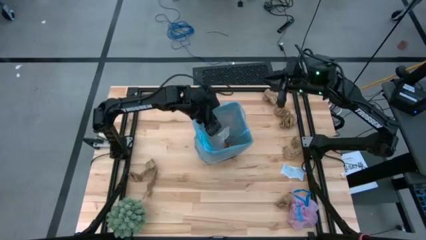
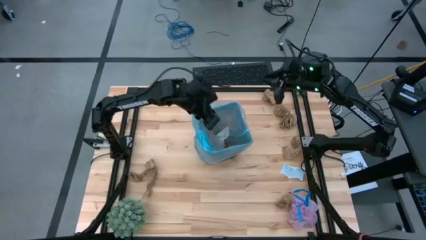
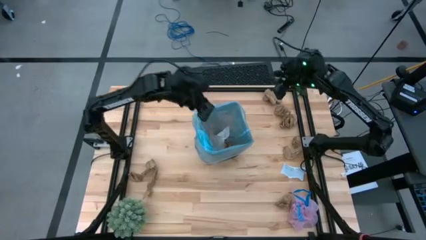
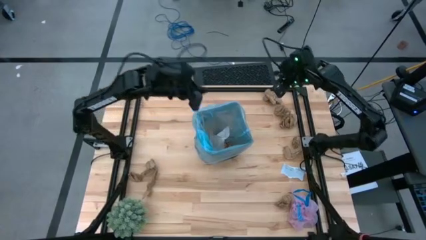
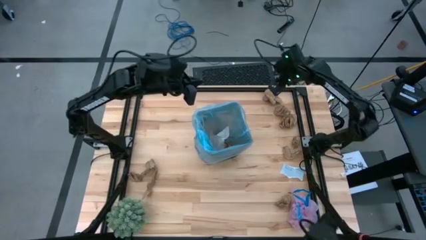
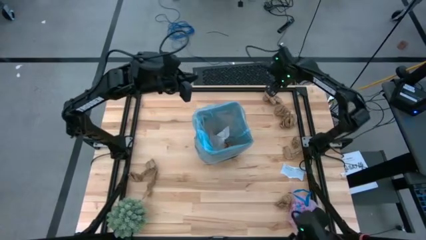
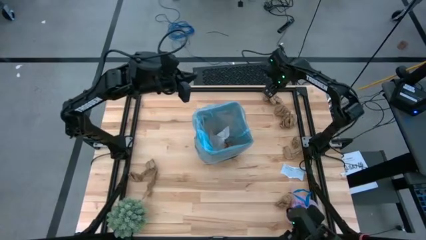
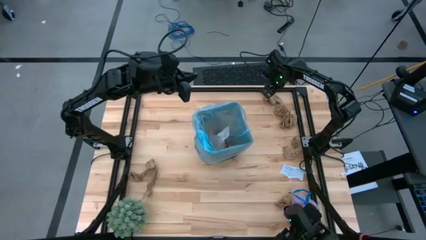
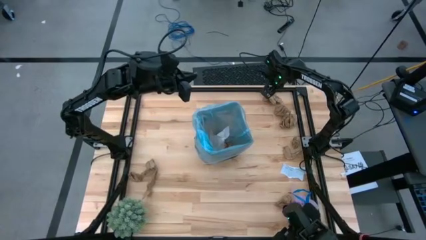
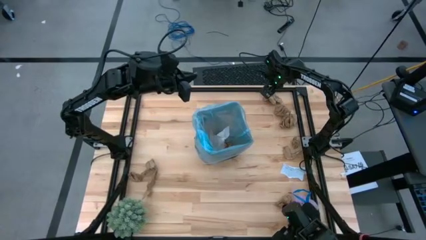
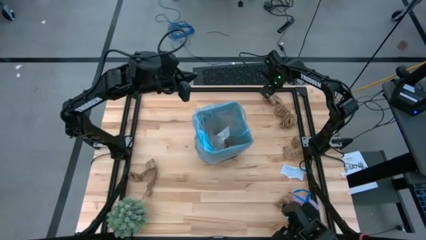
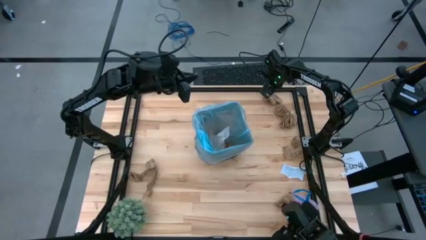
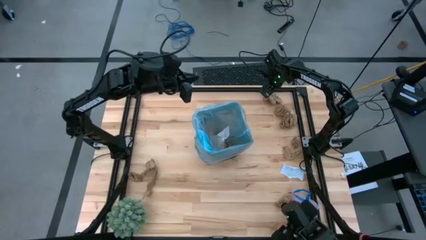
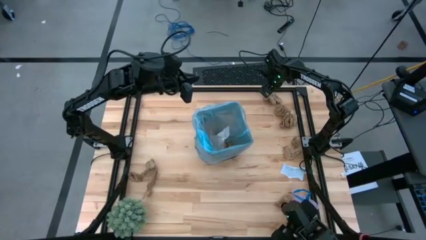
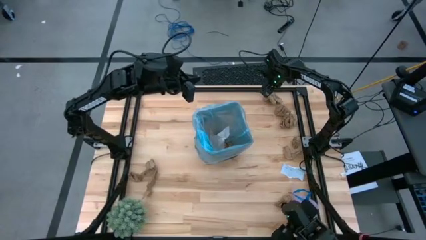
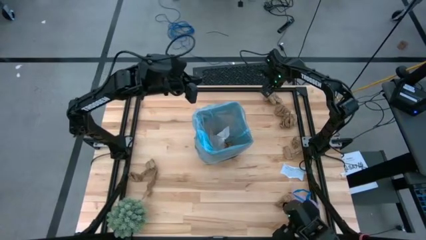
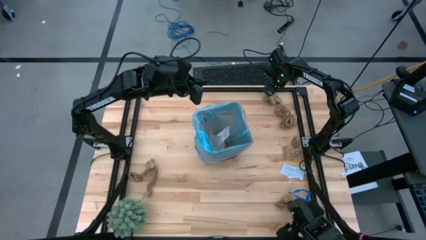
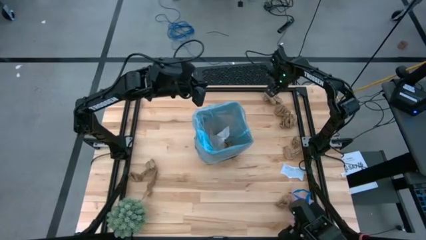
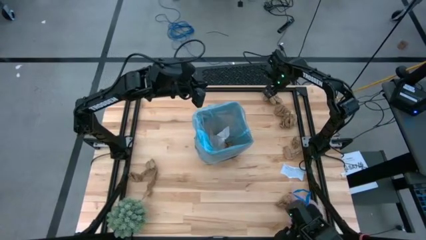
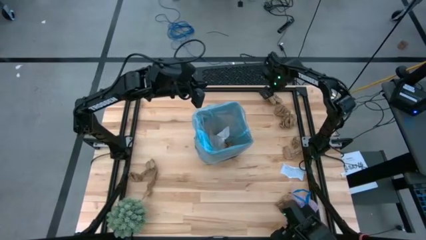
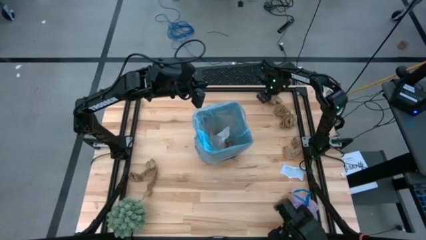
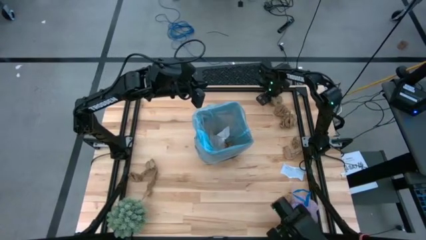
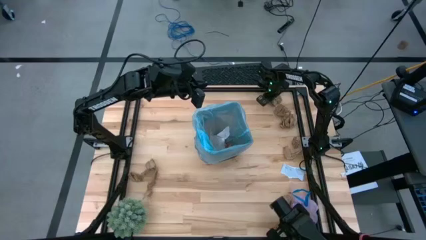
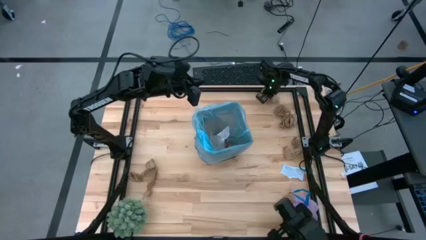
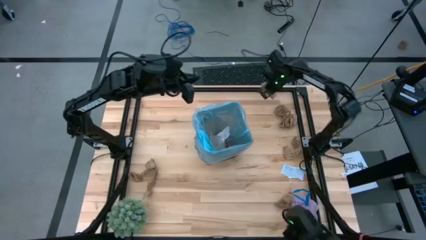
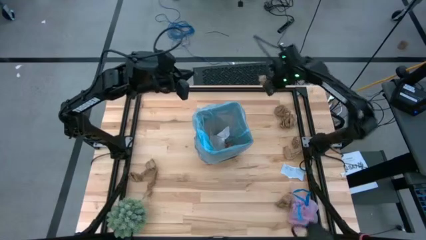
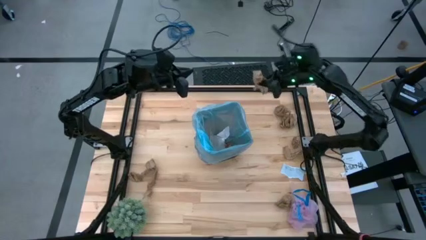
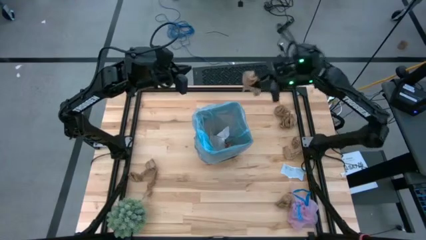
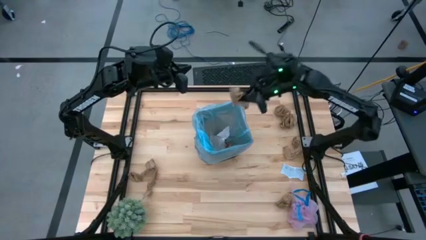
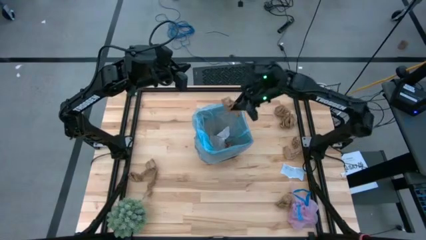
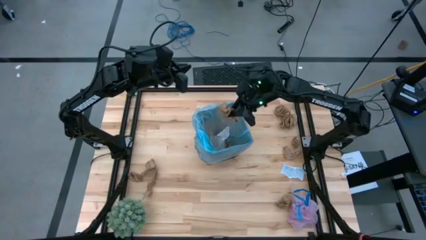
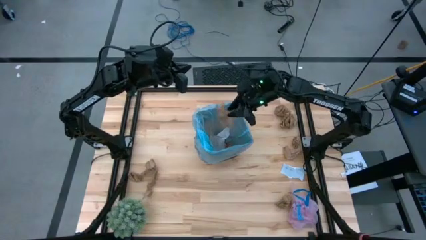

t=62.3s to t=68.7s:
Task: Pick and place trash into bin
Put the brown paper into the brown trash bin

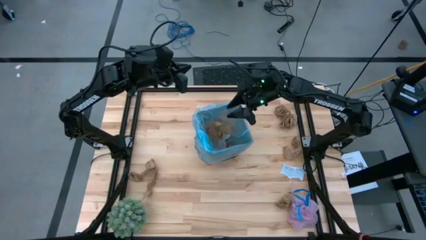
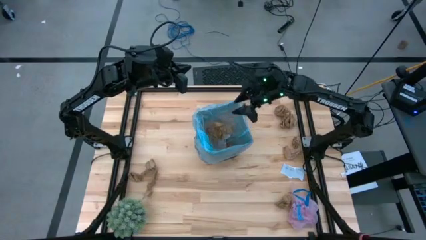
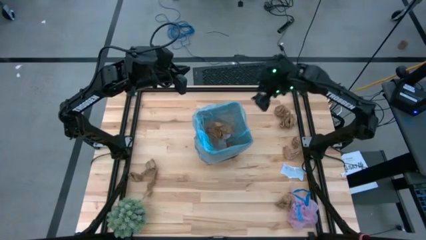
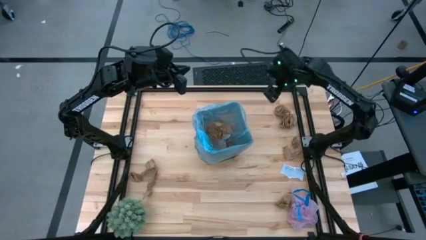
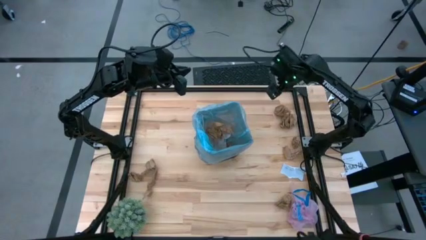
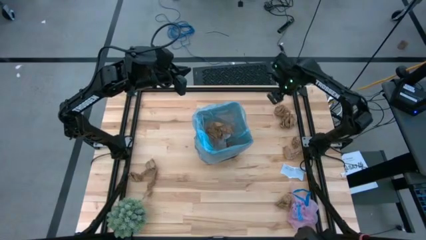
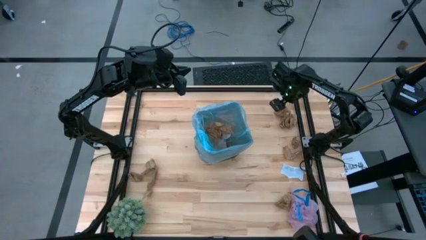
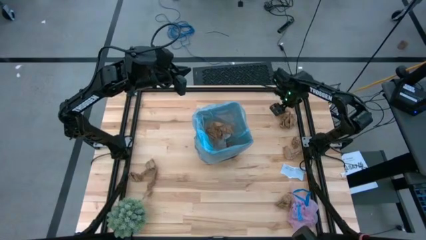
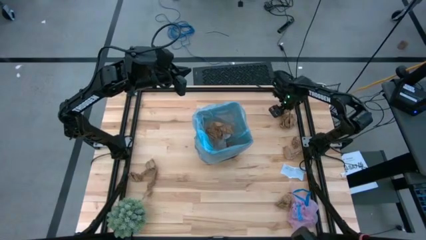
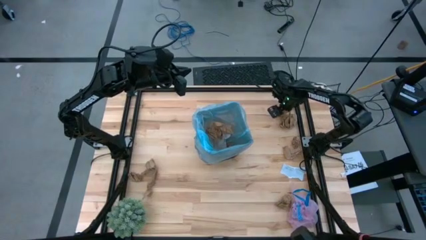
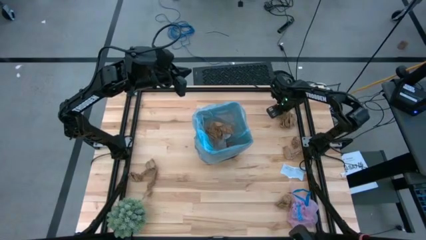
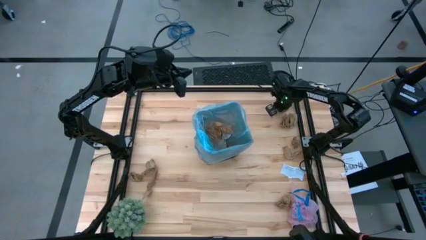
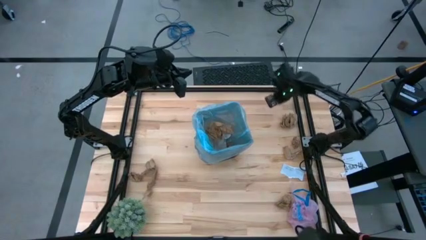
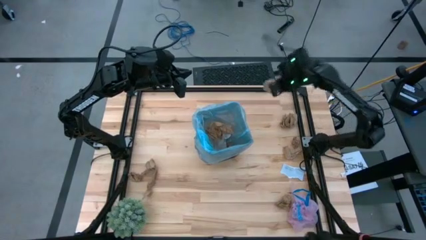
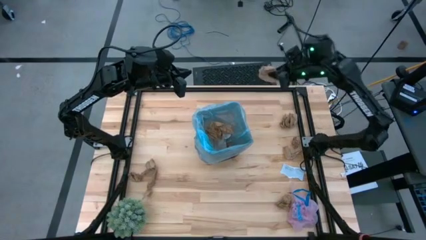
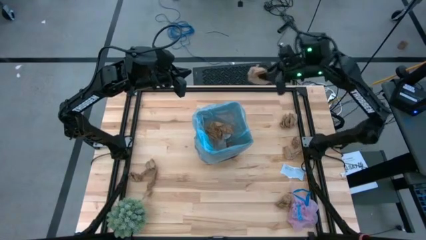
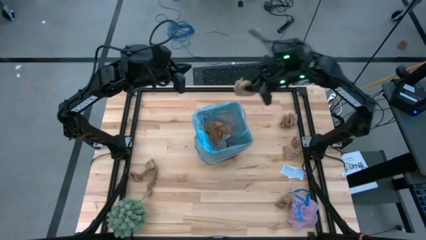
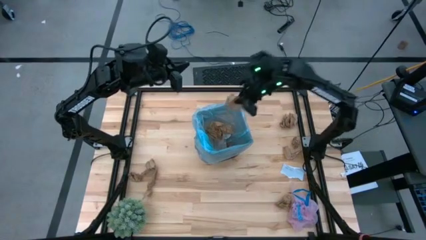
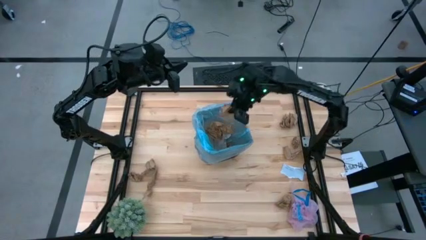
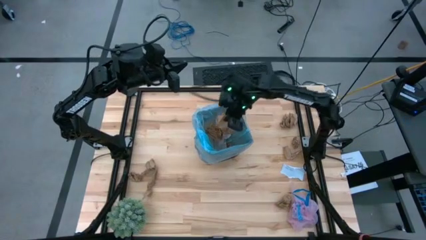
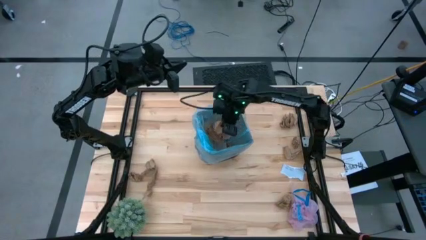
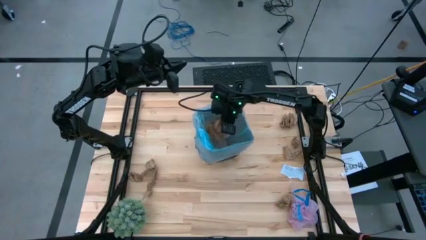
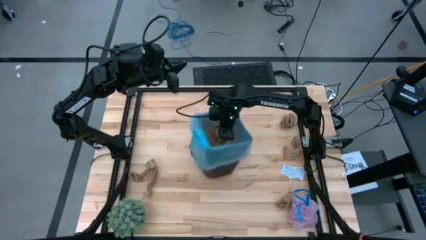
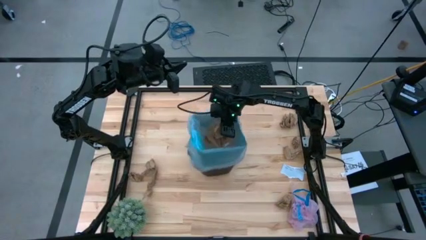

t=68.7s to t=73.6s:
Put the brown paper into the brown trash bin

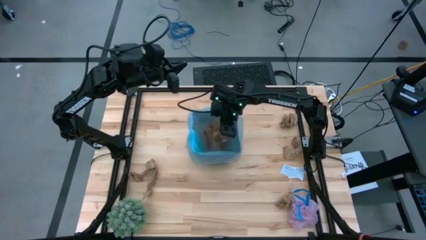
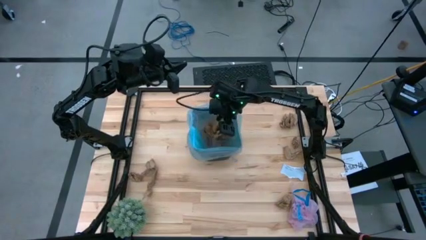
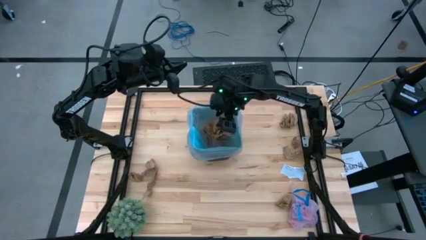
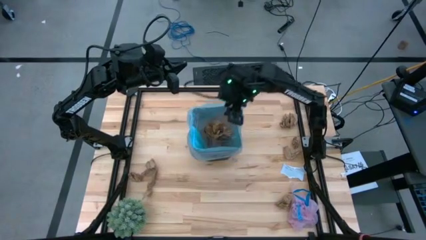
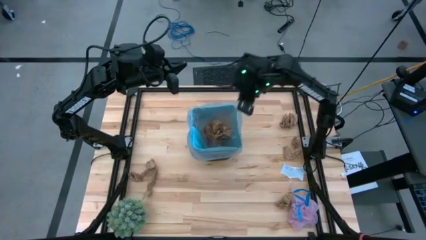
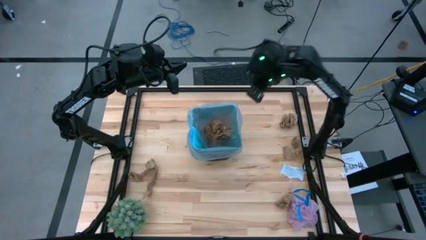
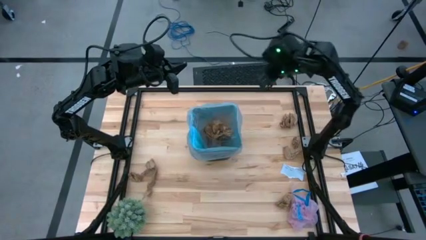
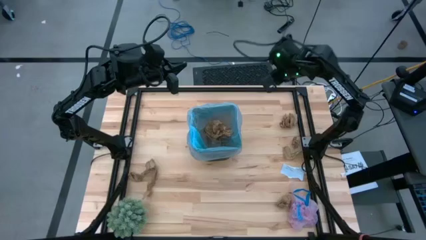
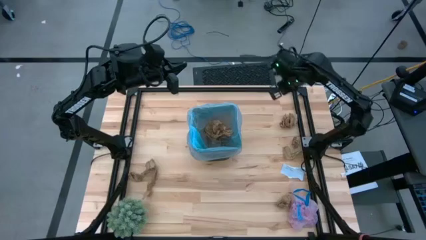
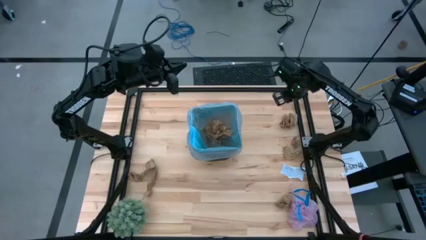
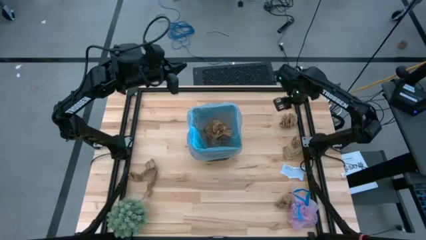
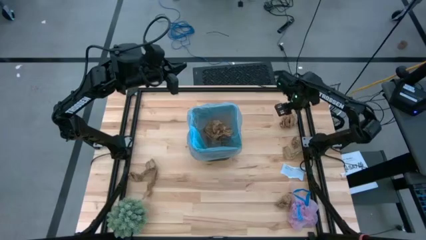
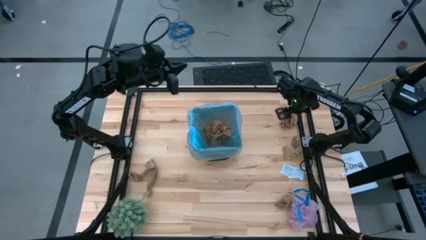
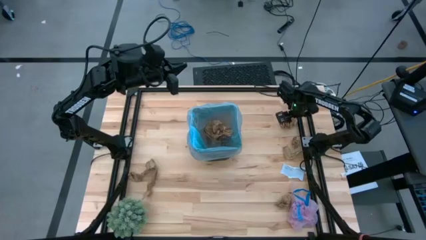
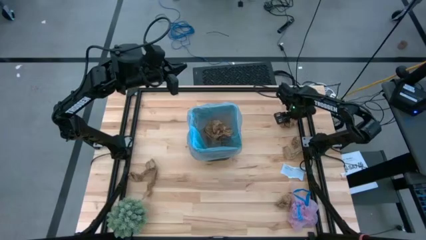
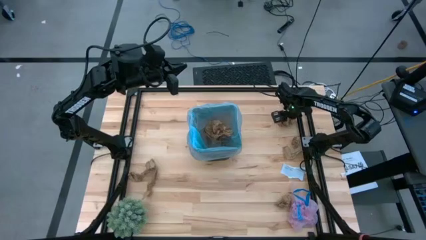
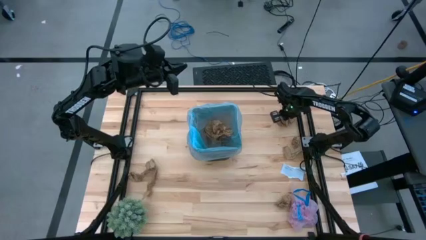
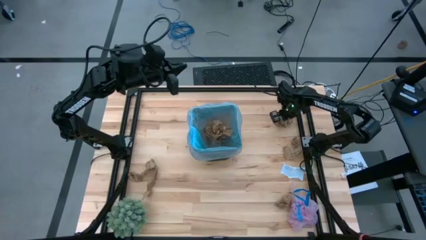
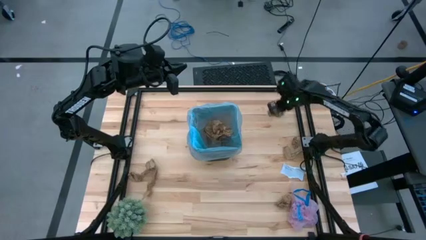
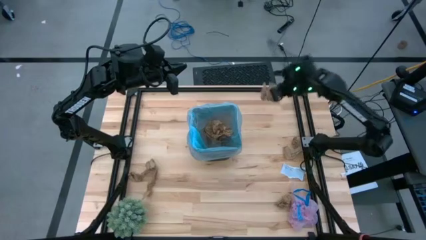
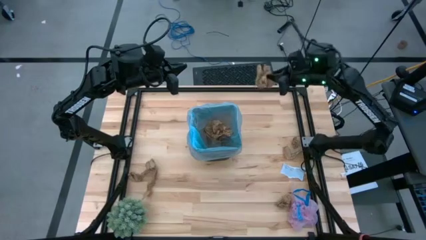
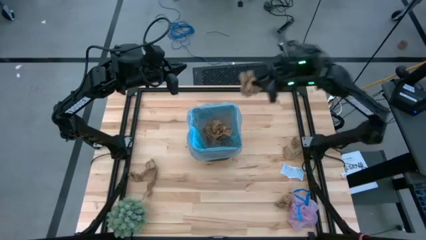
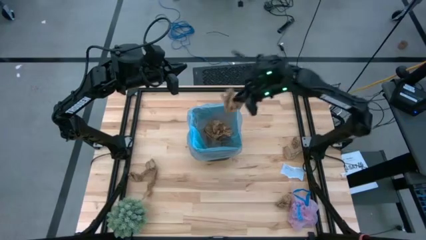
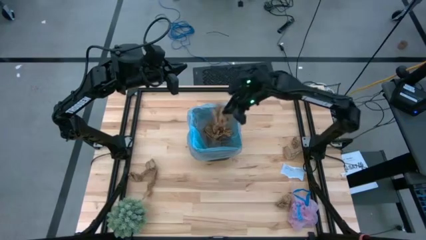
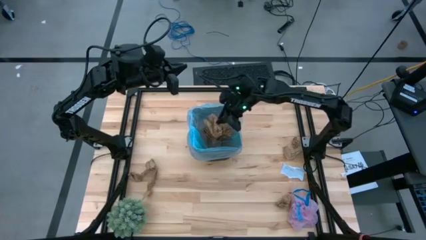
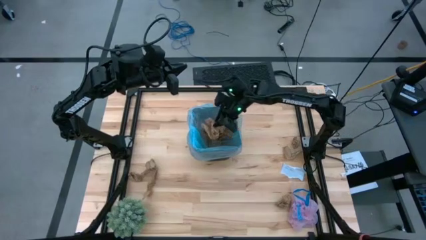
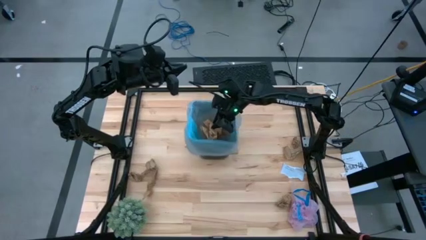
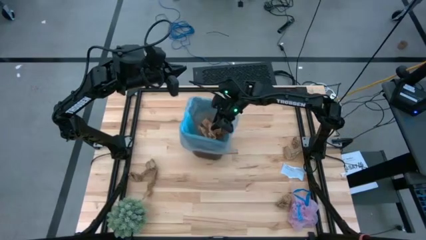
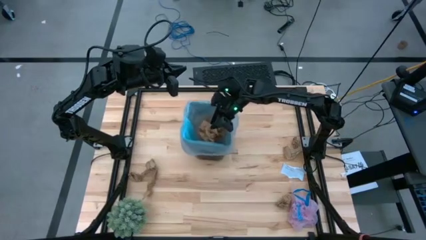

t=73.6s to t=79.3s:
Put the brown paper into the brown trash bin
